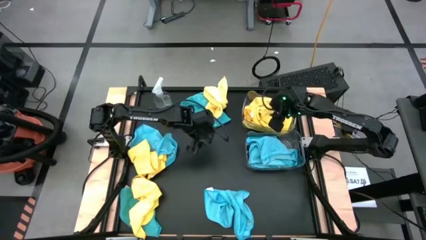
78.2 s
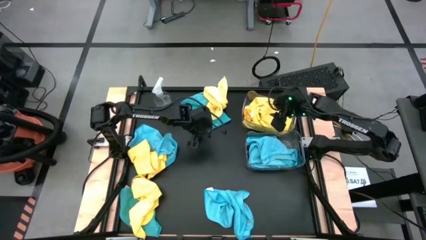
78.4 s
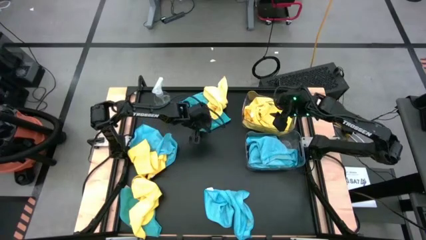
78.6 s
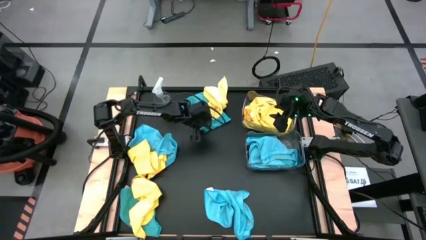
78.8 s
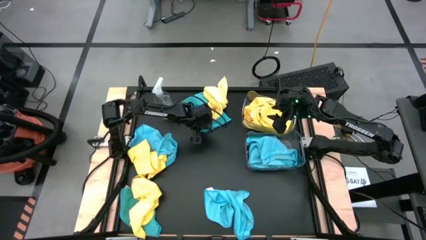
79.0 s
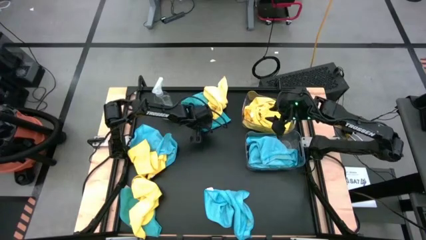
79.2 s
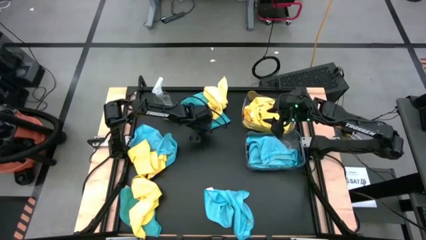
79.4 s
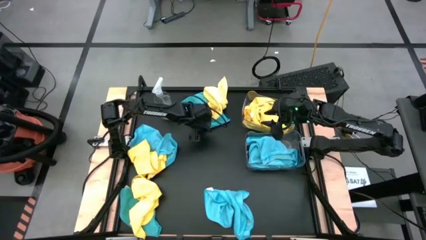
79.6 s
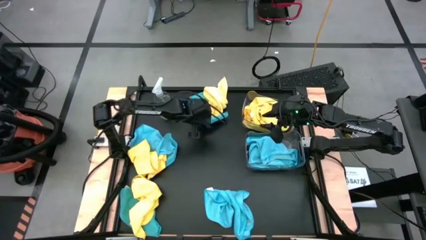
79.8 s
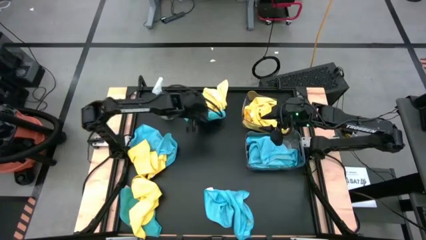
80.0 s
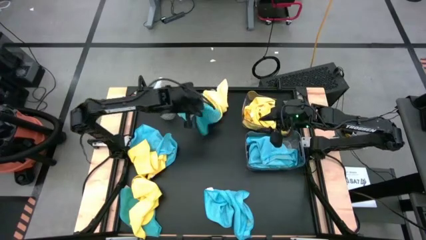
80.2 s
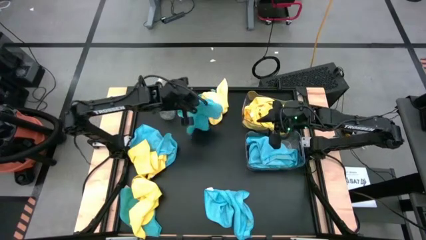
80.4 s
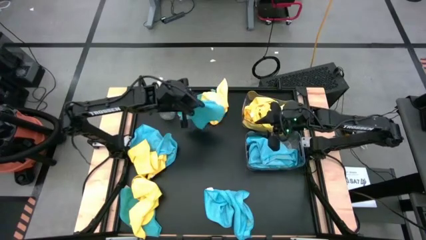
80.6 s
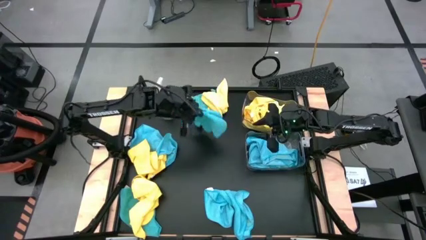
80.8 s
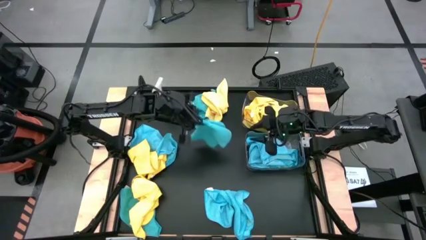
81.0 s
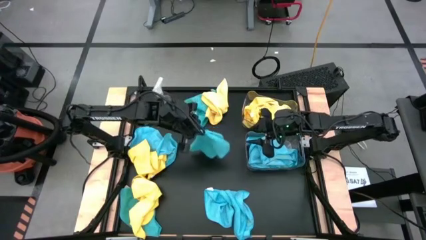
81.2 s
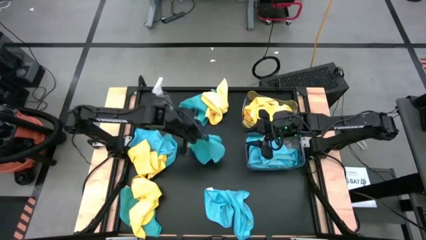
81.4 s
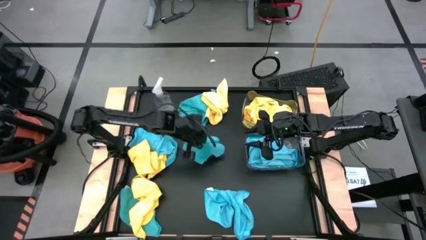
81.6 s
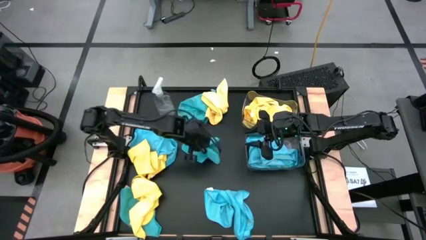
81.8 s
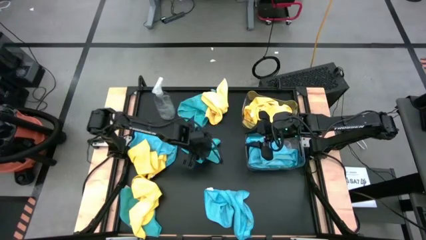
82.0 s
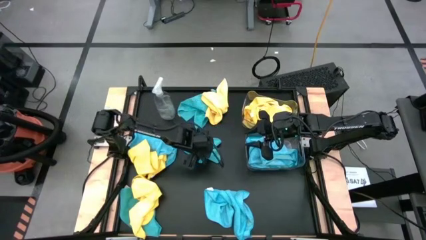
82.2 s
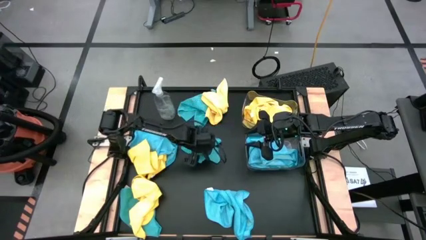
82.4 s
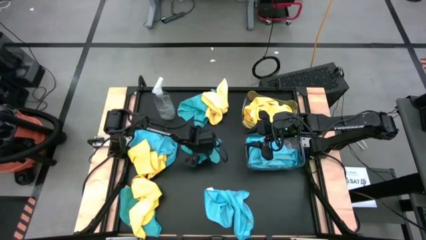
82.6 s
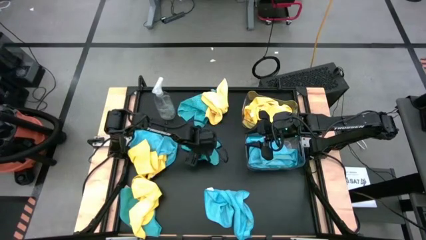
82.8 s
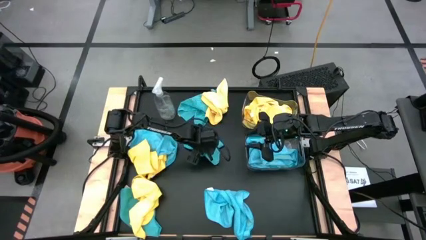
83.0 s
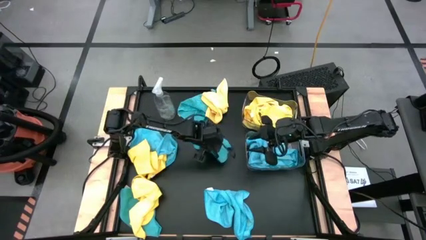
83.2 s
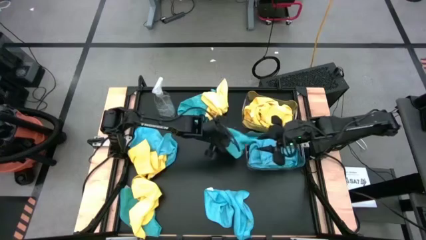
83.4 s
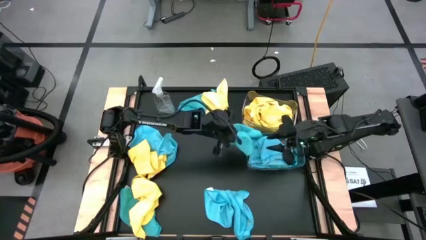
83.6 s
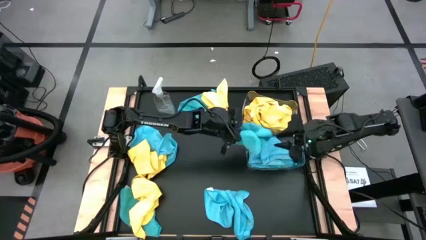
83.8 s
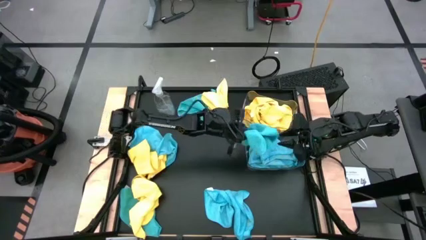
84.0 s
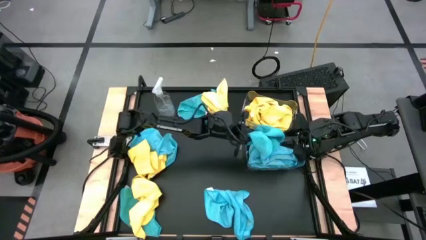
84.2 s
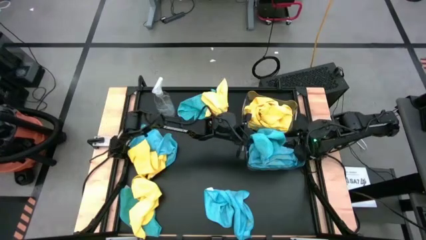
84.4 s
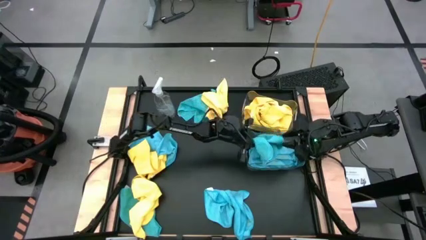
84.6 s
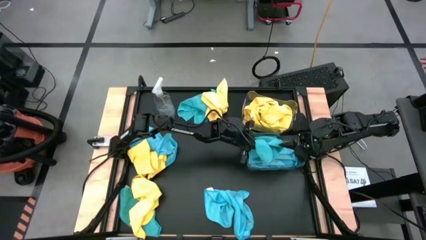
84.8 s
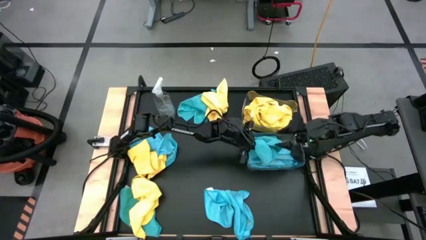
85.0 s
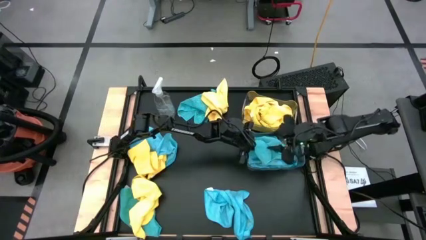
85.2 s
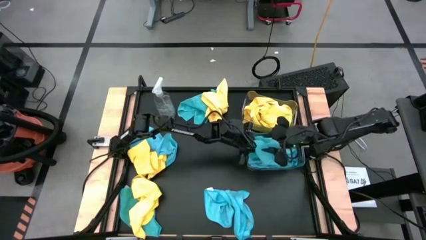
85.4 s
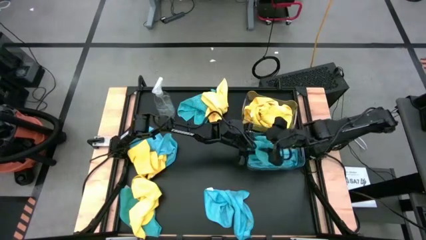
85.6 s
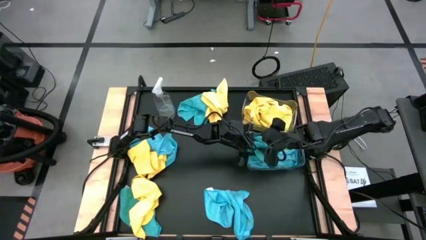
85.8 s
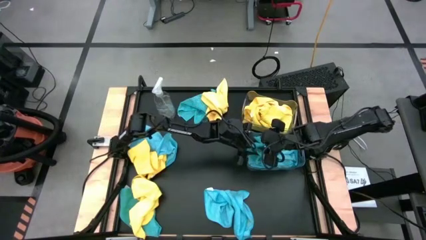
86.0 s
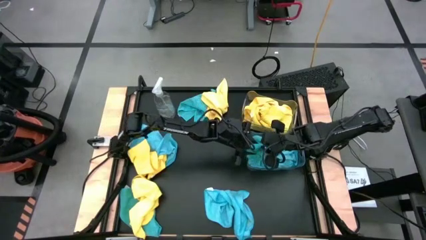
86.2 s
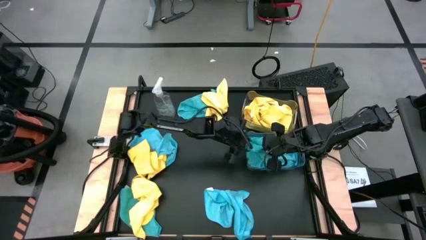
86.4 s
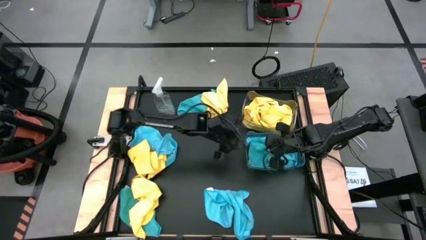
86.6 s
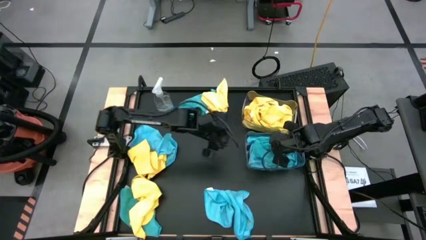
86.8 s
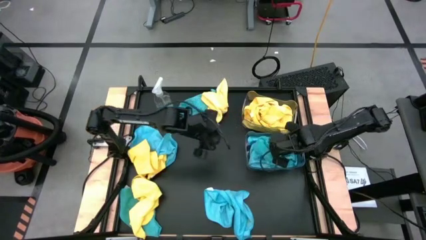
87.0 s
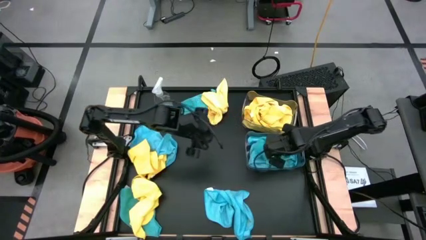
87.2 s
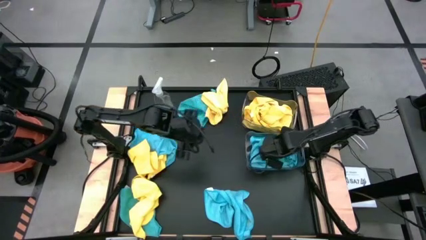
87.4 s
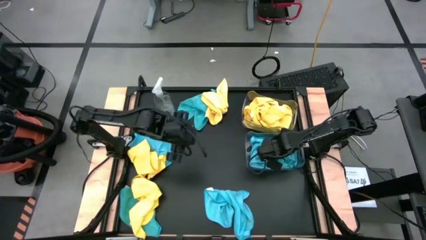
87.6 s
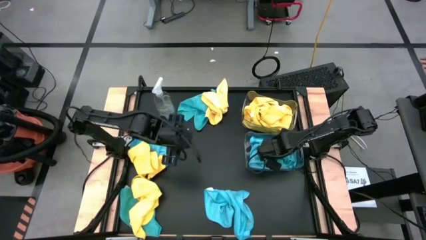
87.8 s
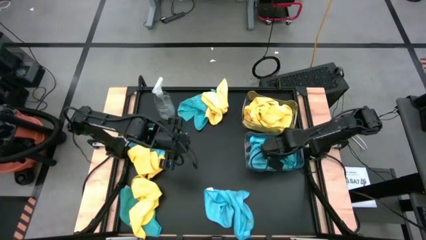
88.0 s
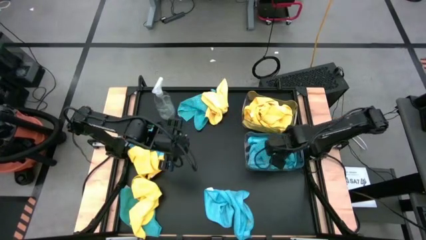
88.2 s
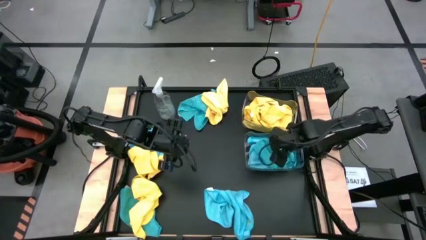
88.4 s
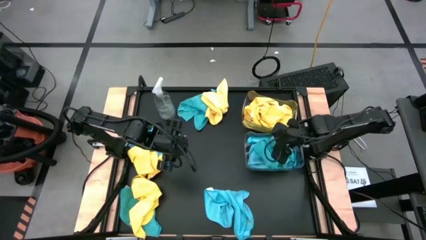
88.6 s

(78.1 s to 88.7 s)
Task: Sort microfiber towel by color & place in baskets
Put the blue microfiber towel into the bottom transparent bin

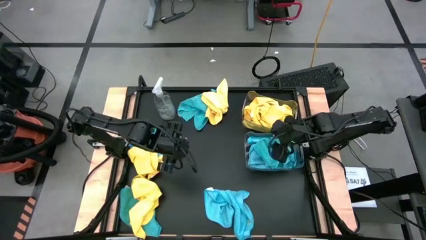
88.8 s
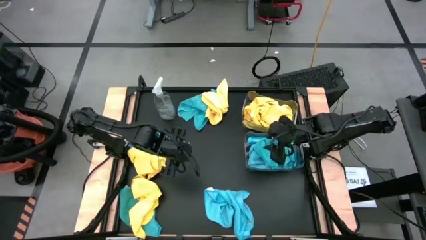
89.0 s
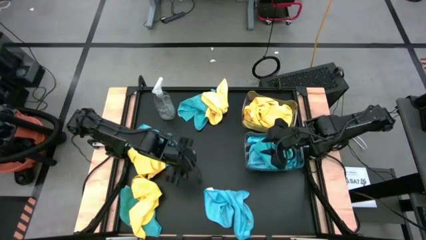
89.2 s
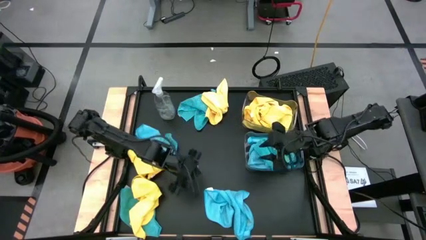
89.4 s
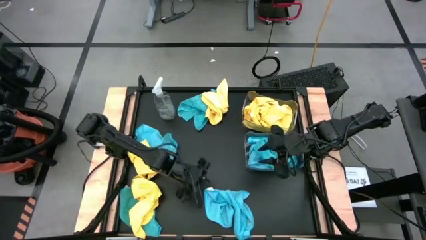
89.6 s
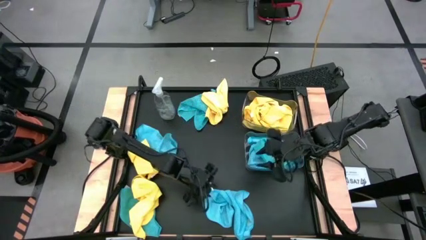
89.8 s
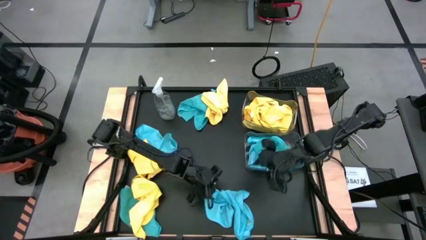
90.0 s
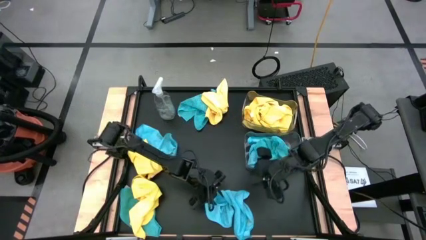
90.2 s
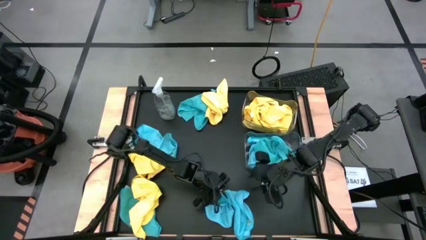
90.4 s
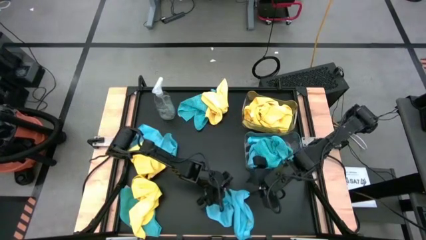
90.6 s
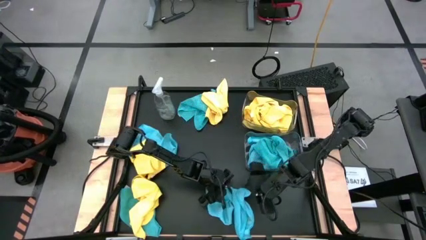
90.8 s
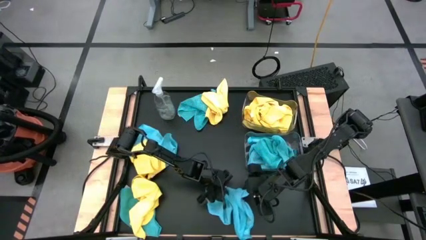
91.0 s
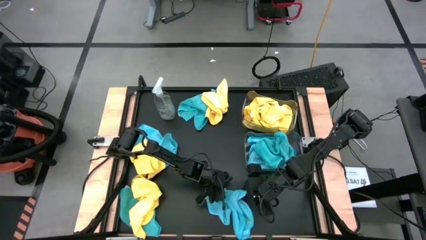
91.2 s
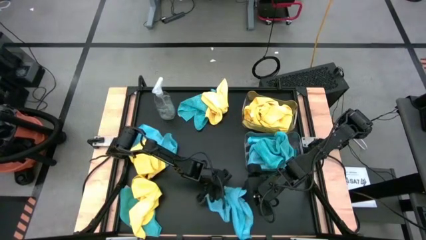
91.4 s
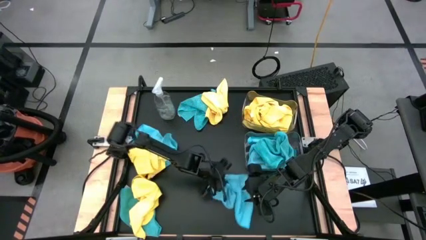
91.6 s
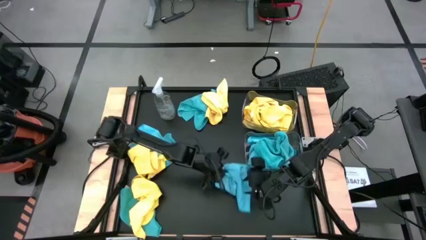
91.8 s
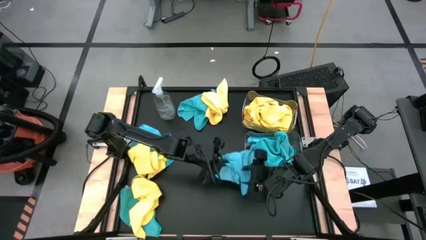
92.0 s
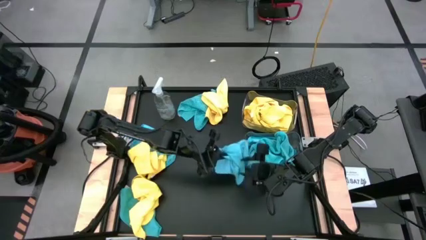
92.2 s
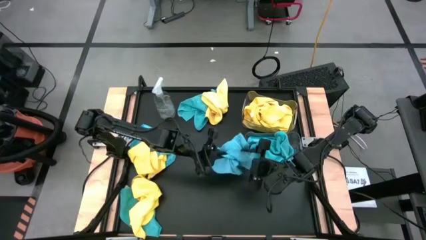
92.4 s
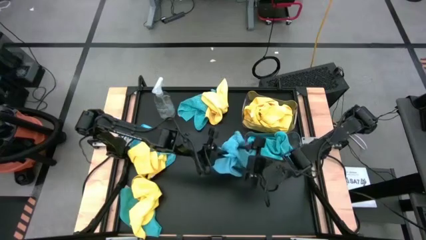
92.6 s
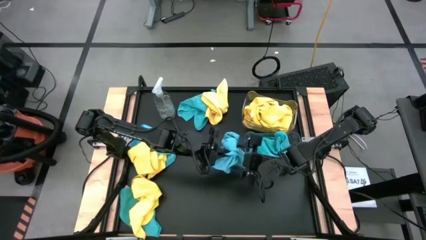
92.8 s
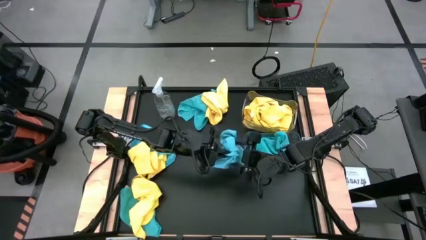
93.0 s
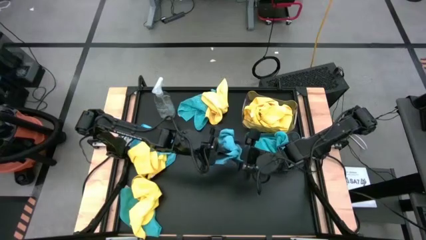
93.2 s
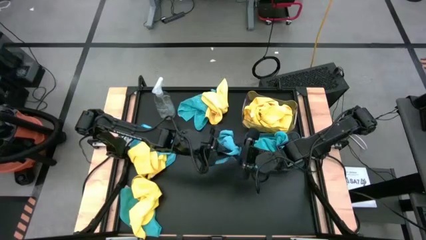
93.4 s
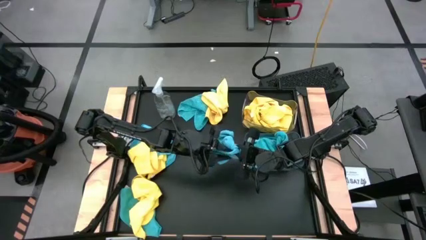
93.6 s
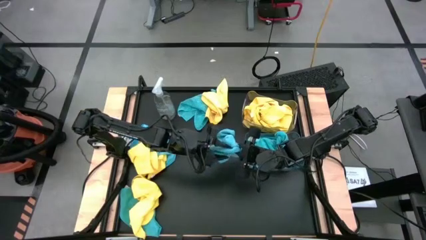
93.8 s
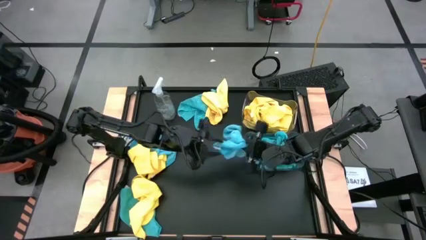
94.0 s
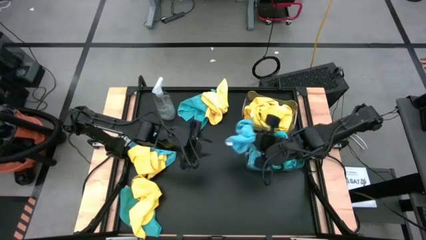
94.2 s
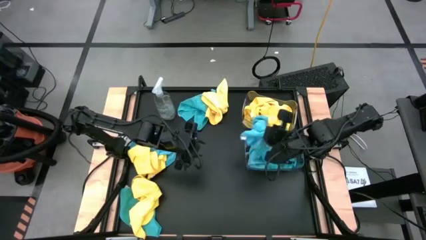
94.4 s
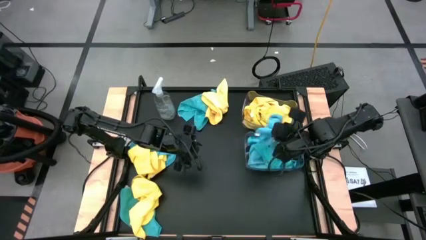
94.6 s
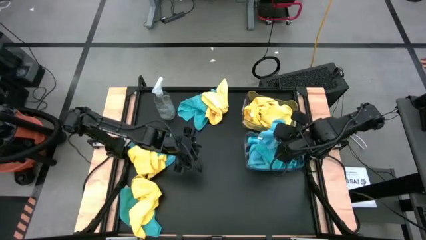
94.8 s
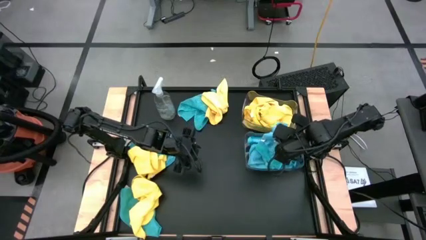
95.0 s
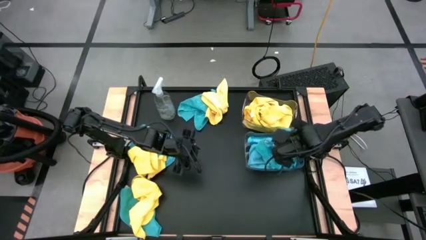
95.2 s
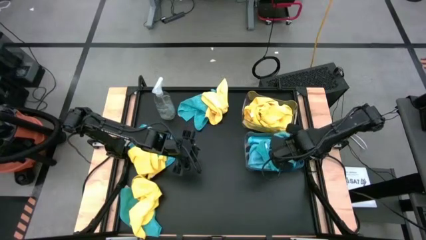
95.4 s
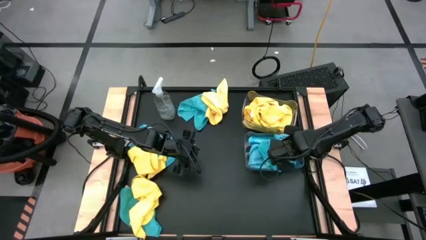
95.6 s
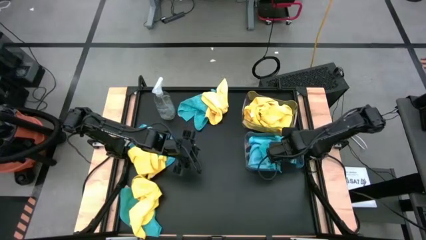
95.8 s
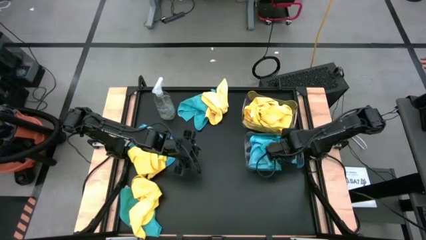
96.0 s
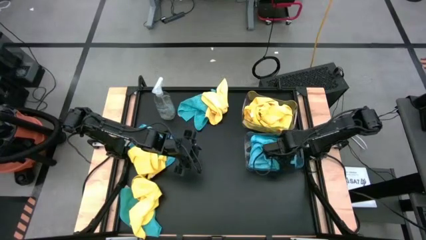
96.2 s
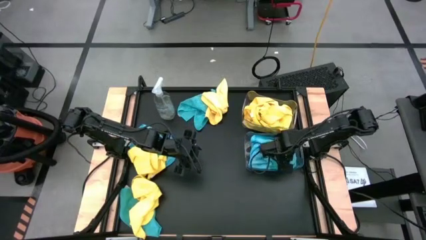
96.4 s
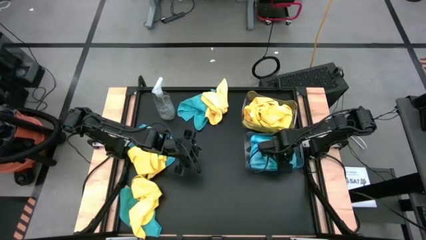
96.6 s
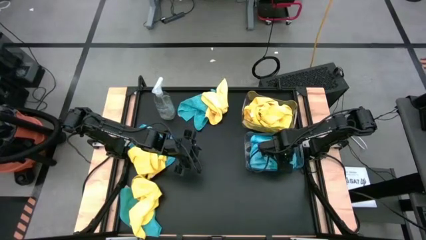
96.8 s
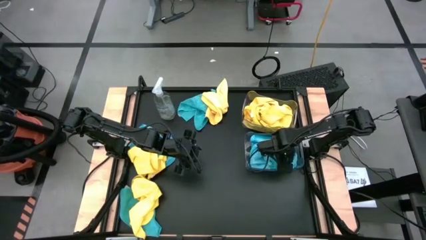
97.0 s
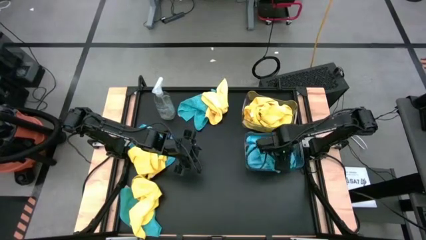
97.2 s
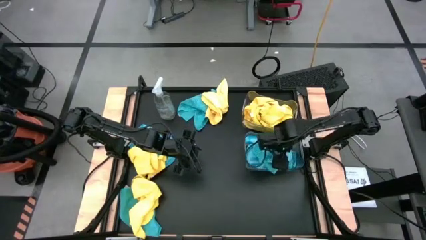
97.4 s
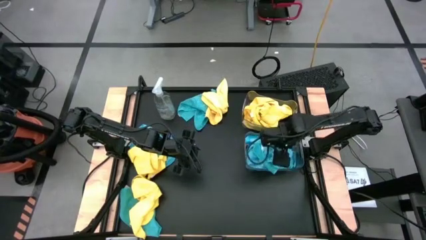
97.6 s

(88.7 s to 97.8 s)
Put the blue microfiber towel into the bottom transparent bin
